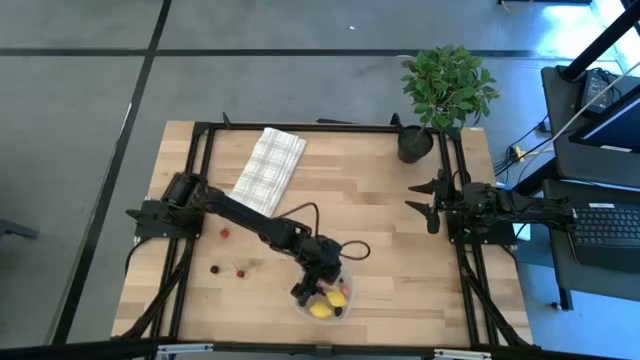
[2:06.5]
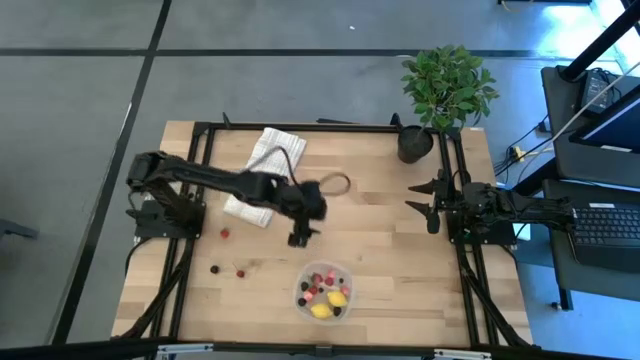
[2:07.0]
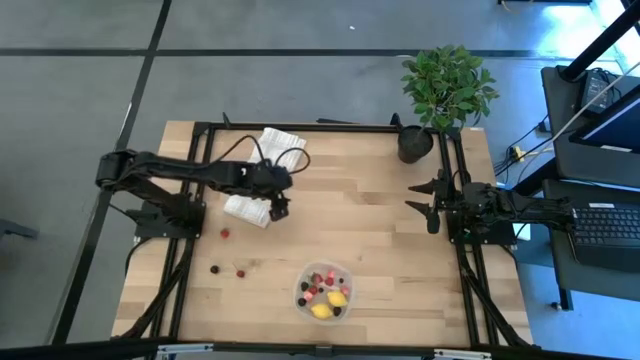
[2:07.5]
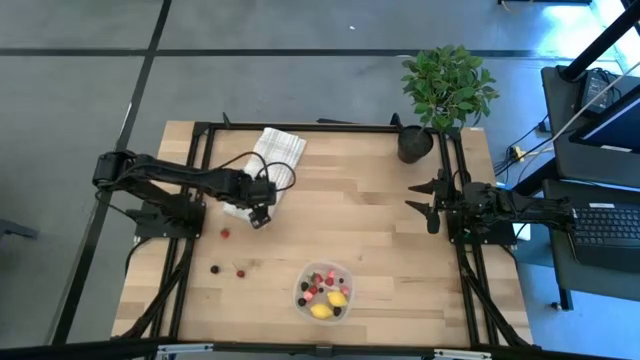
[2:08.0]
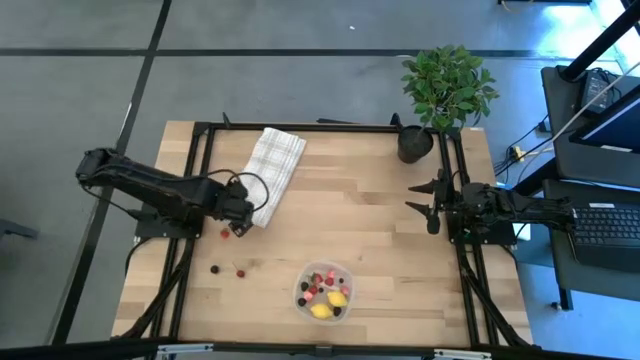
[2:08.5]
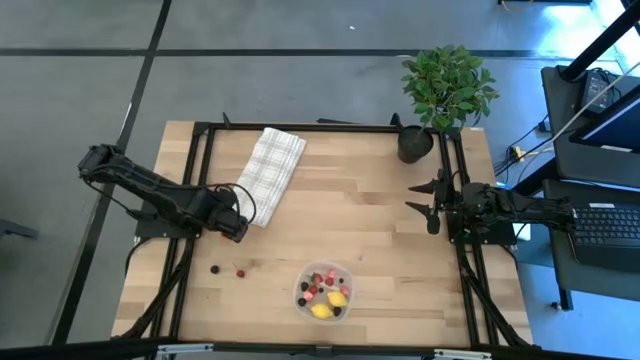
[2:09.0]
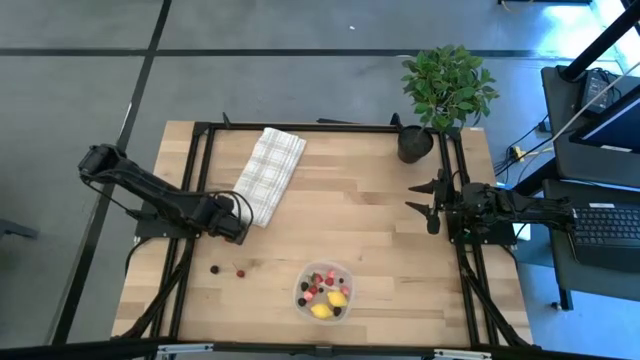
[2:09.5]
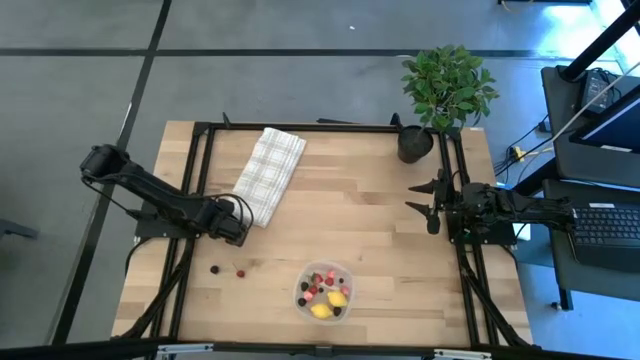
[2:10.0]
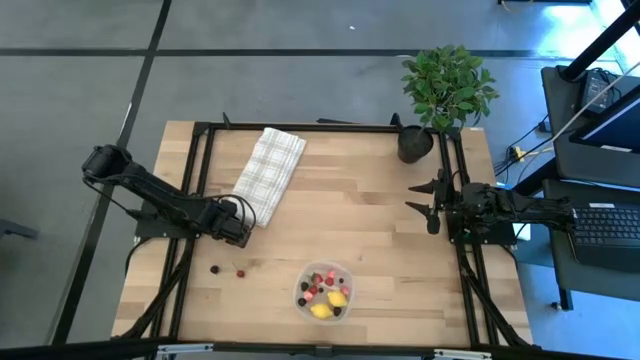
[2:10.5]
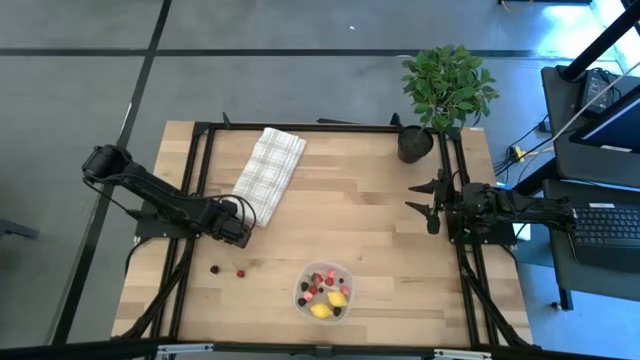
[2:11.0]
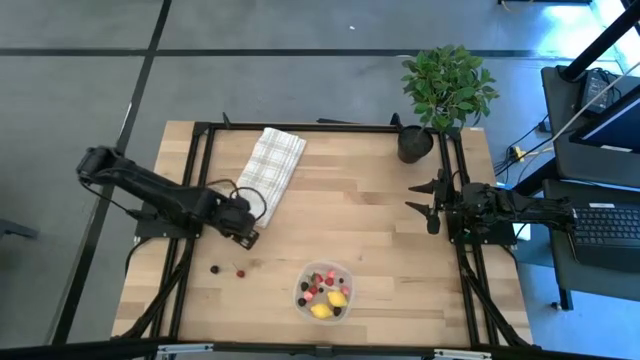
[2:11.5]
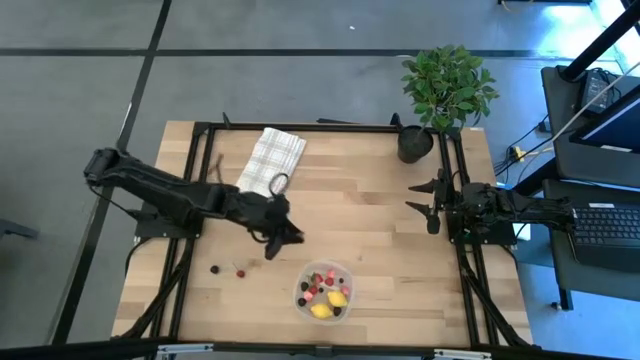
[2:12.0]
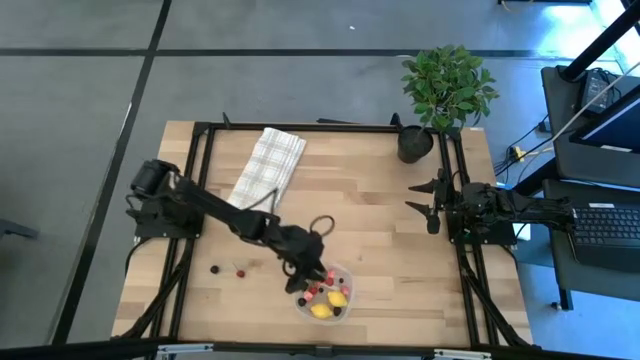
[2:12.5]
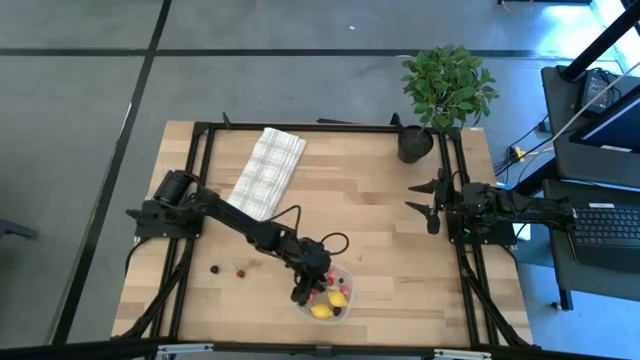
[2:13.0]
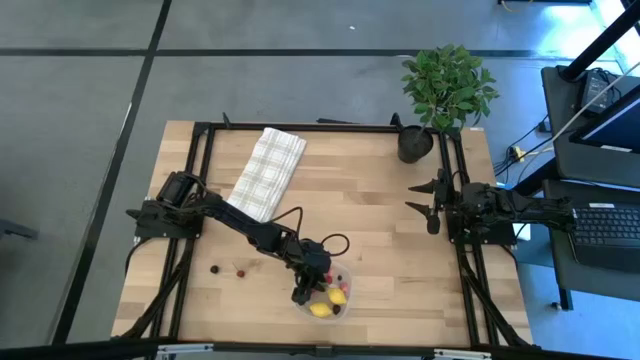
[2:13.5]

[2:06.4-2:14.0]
Task: Pick and placing Produce into tupperware
Put the strawberry into the transparent bin

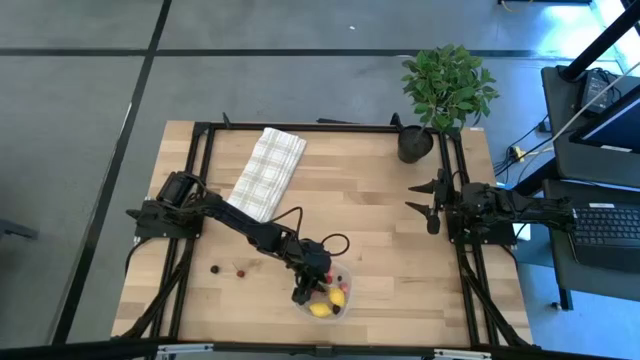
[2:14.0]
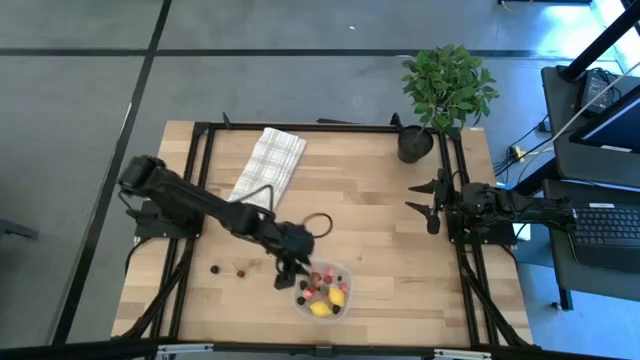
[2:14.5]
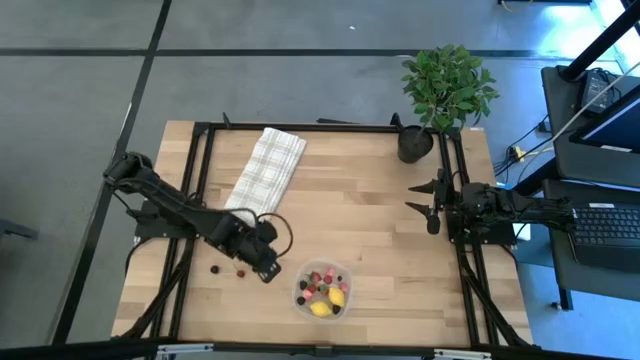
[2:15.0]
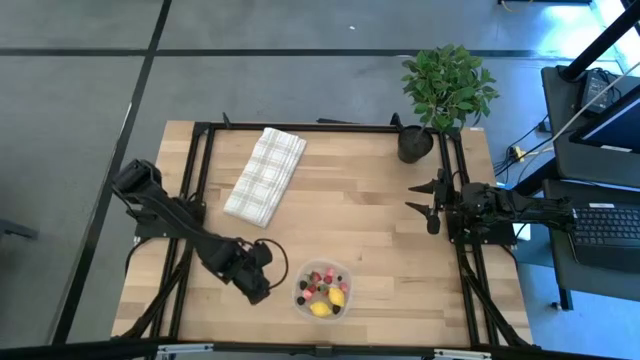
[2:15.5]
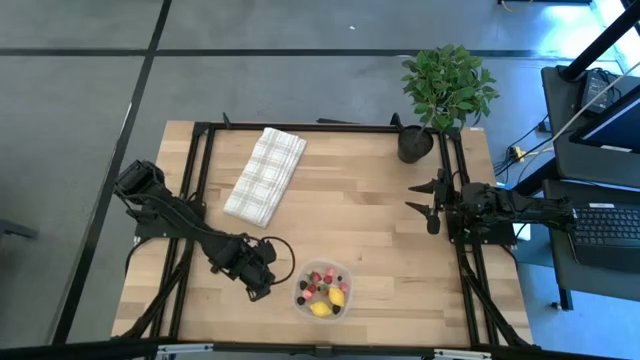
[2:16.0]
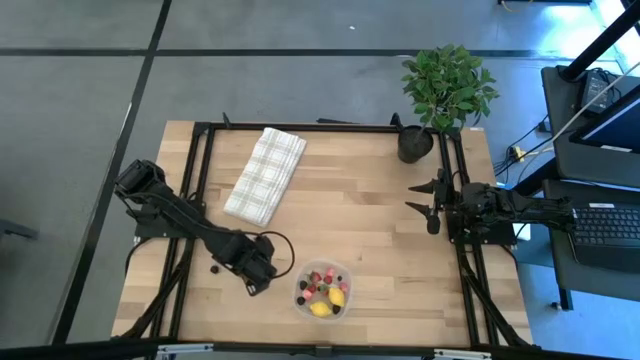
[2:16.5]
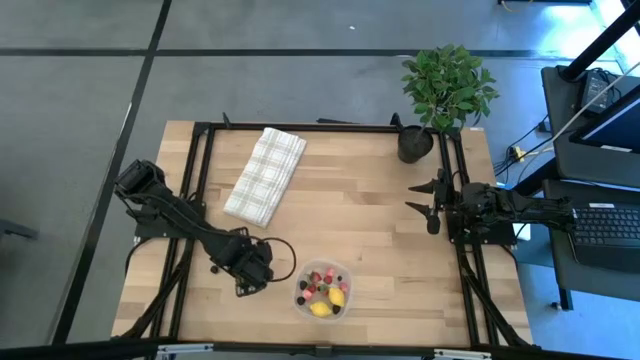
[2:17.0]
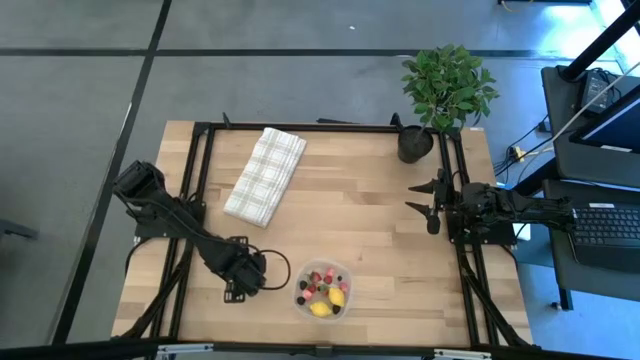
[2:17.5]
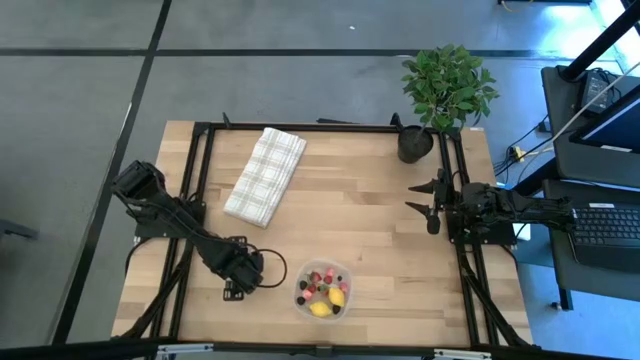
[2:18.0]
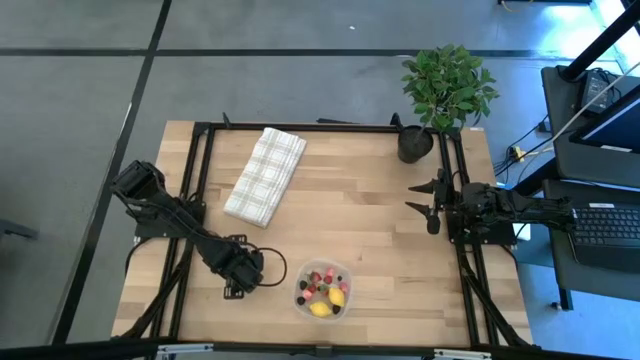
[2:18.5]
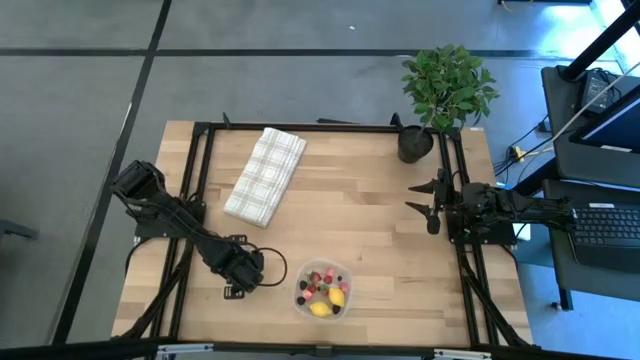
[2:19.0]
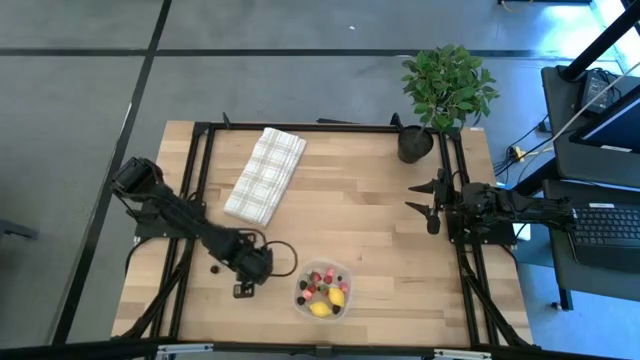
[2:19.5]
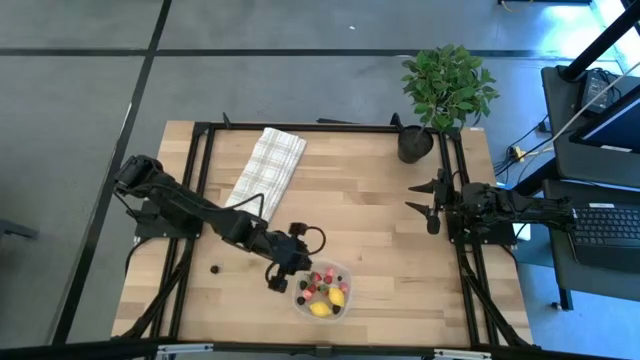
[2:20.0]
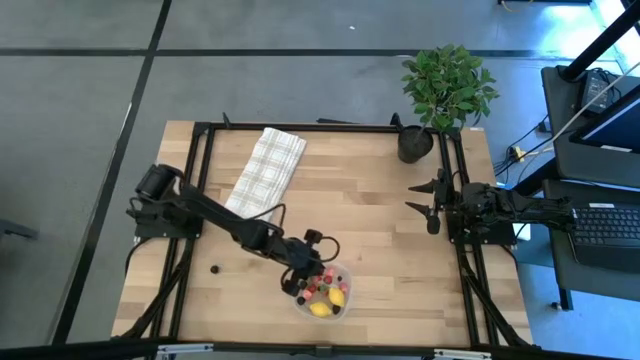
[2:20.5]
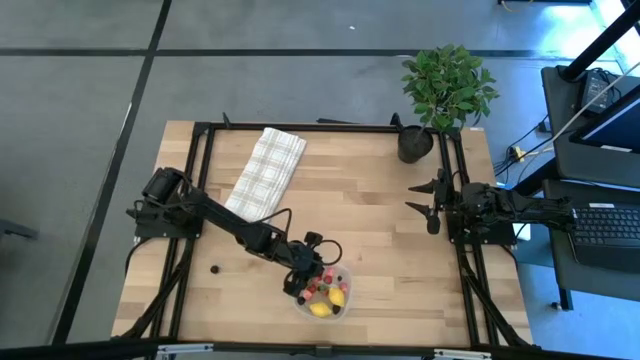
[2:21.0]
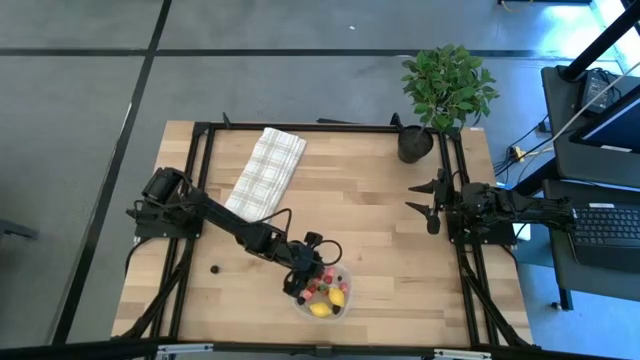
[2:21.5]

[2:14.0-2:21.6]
Put the red cherry into the transparent bin

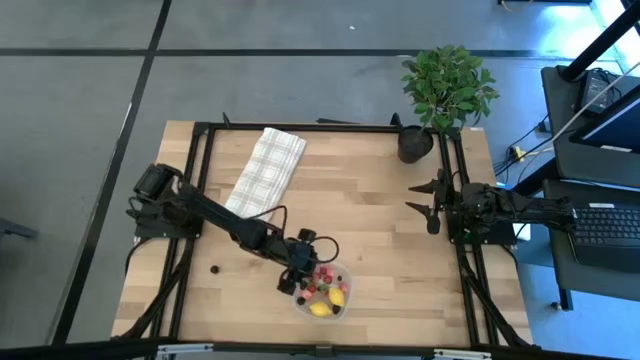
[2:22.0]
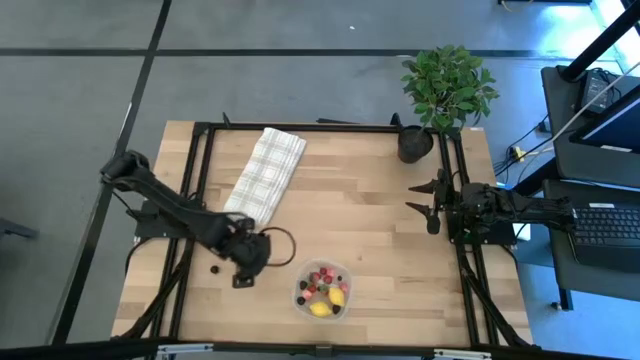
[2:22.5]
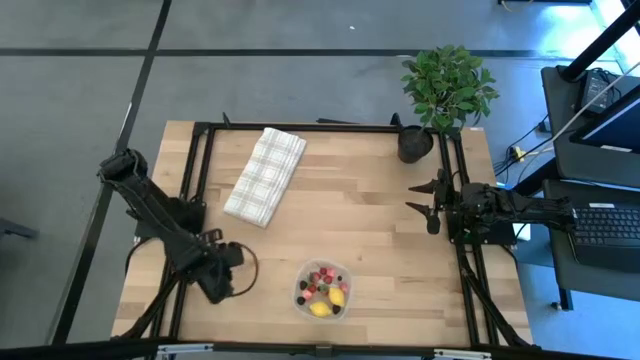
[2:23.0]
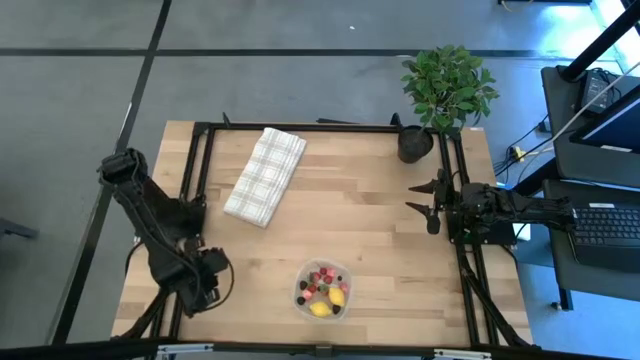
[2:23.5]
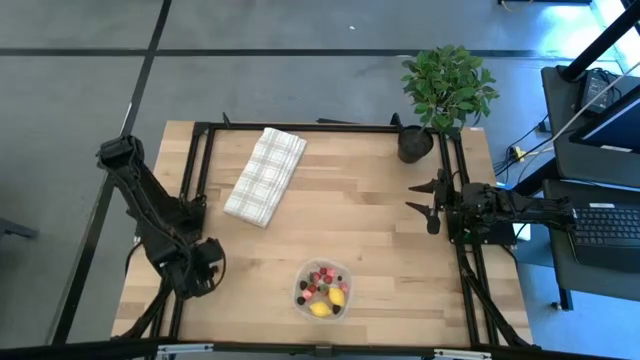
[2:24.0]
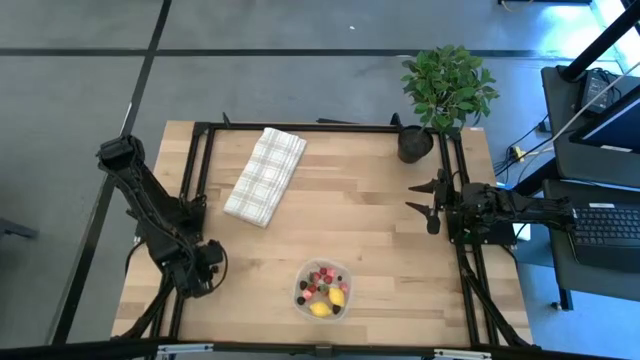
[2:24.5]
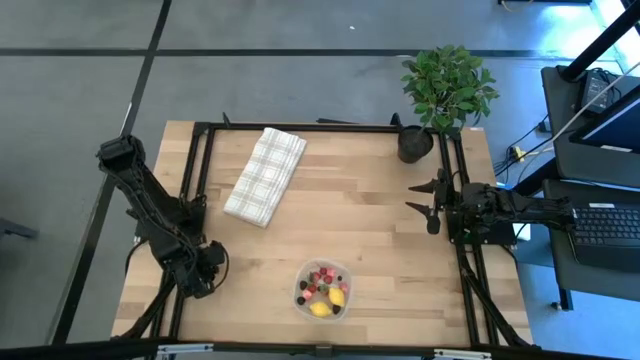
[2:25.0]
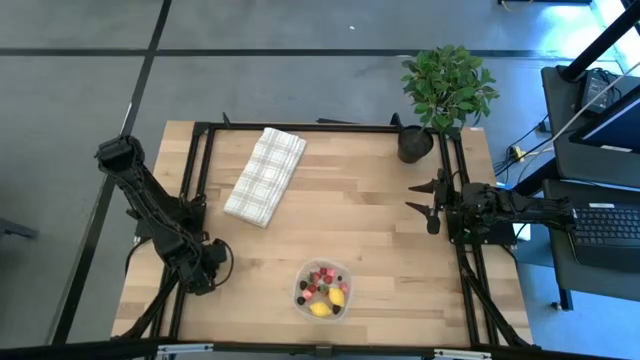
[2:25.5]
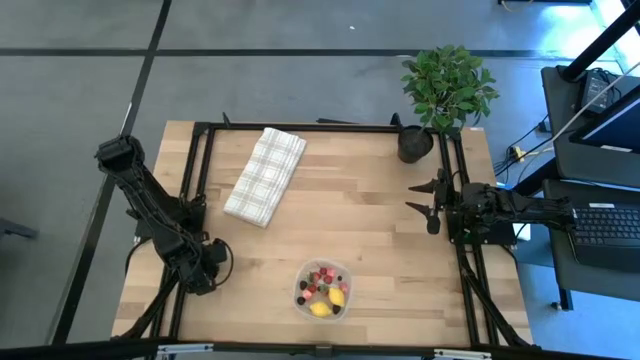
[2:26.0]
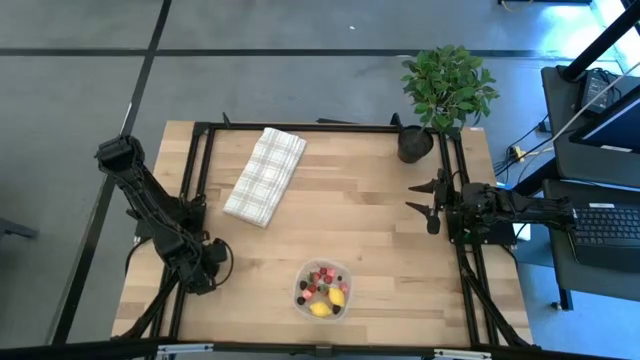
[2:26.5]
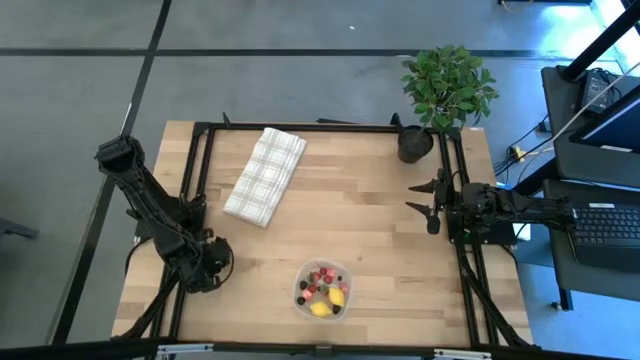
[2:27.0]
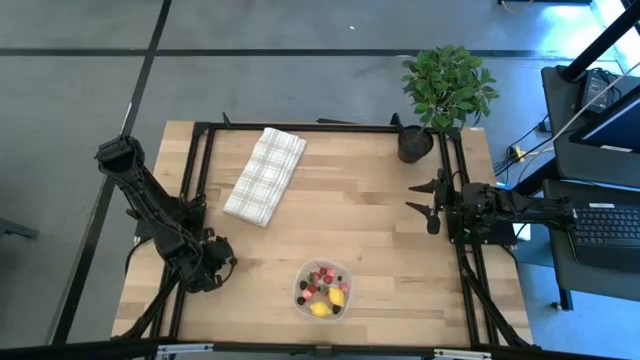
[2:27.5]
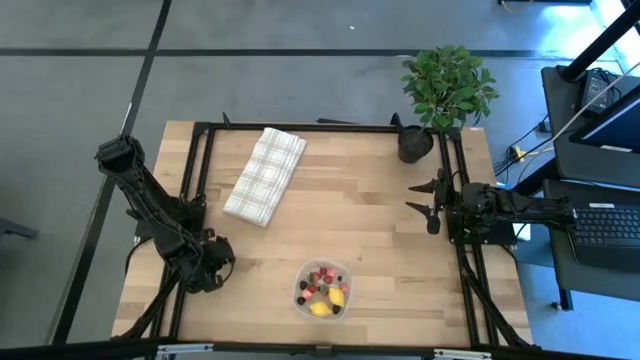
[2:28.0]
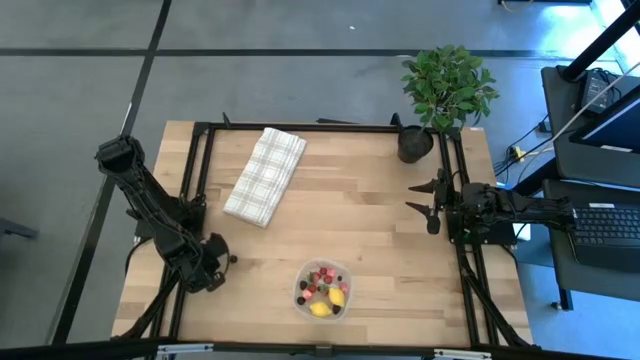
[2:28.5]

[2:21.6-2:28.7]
Put the black cherry into the transparent bin
